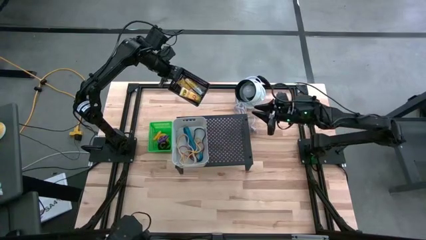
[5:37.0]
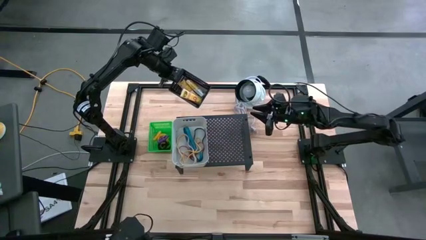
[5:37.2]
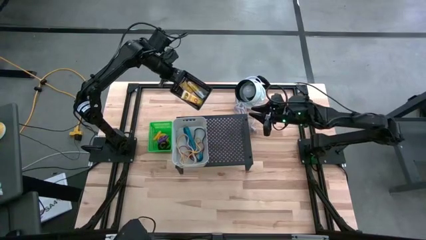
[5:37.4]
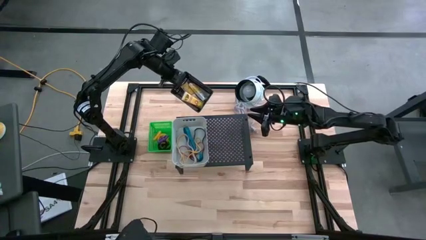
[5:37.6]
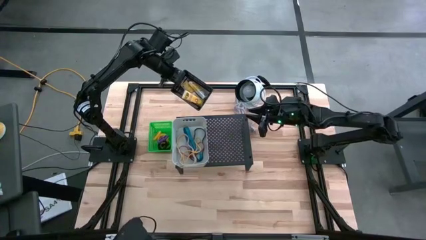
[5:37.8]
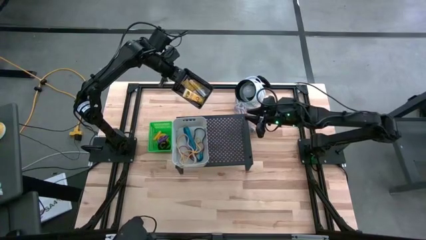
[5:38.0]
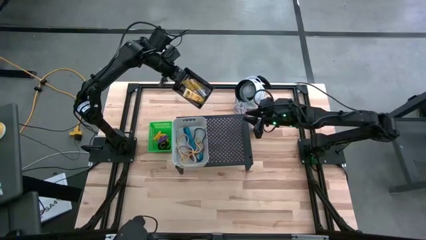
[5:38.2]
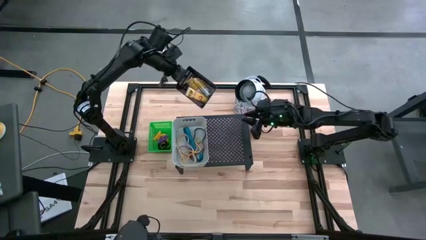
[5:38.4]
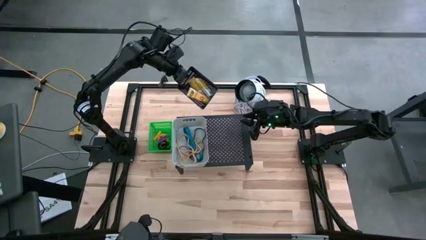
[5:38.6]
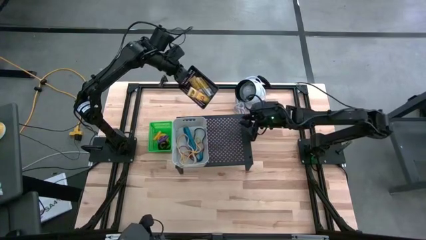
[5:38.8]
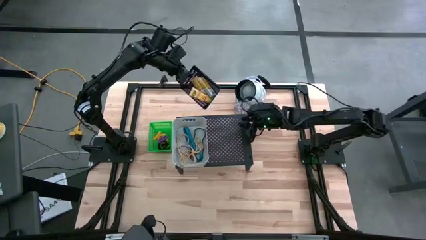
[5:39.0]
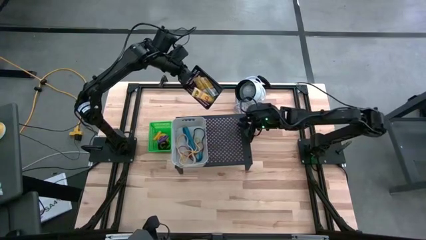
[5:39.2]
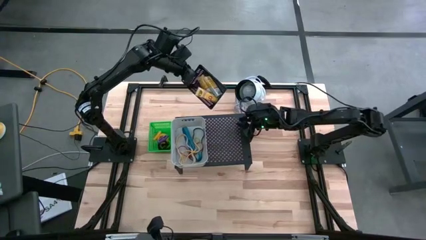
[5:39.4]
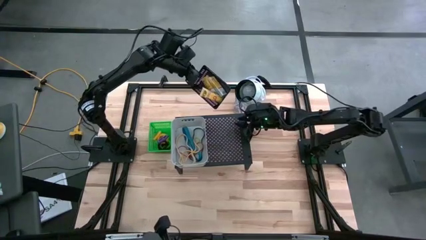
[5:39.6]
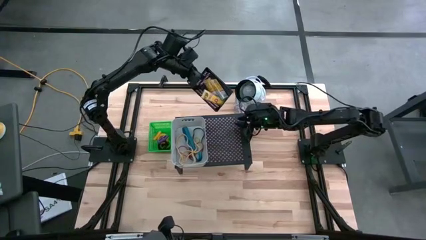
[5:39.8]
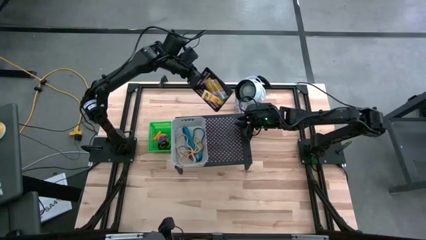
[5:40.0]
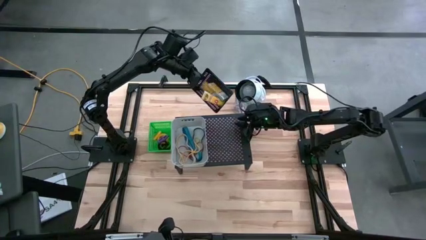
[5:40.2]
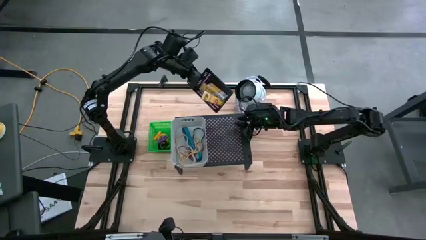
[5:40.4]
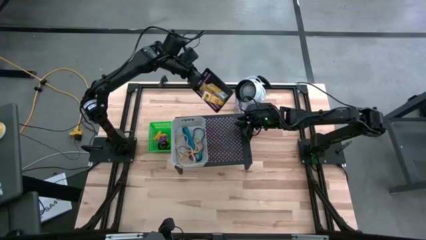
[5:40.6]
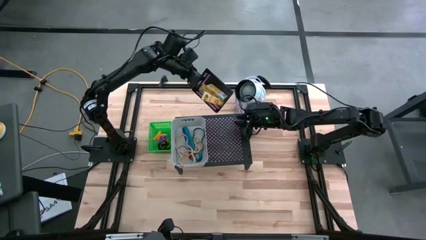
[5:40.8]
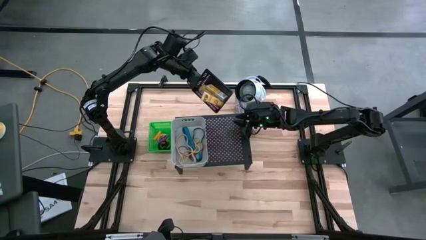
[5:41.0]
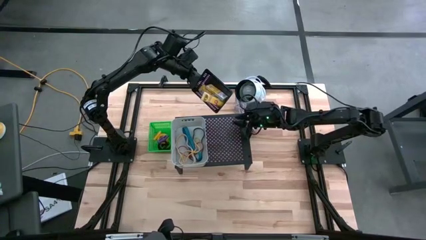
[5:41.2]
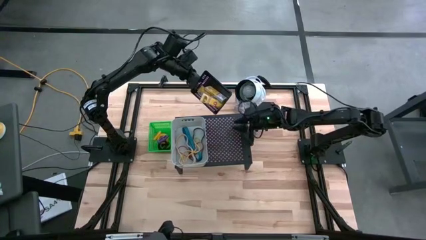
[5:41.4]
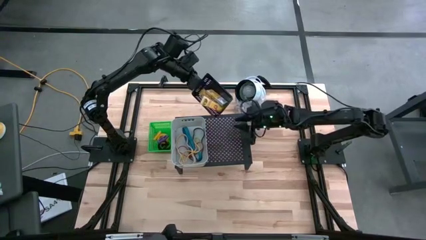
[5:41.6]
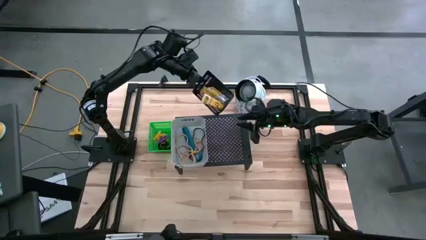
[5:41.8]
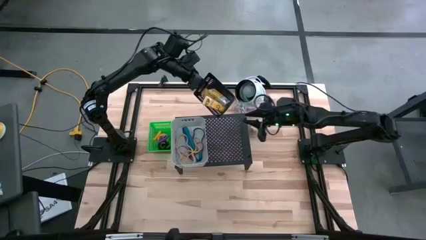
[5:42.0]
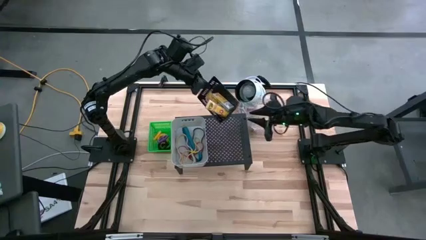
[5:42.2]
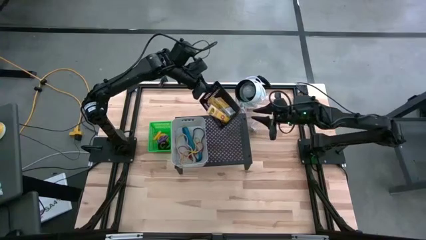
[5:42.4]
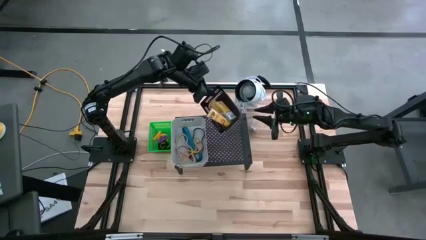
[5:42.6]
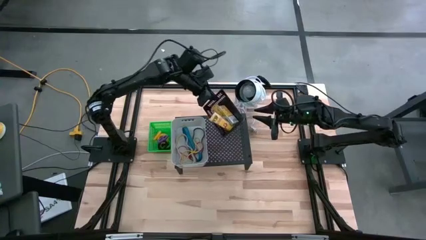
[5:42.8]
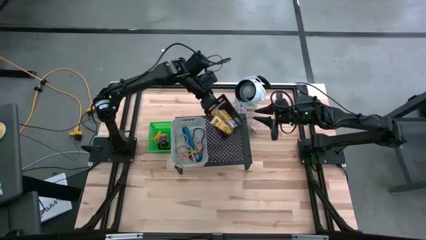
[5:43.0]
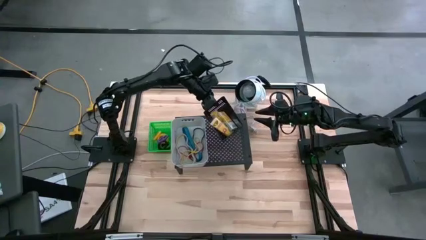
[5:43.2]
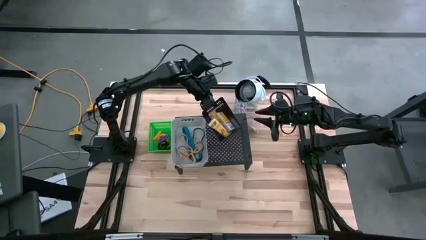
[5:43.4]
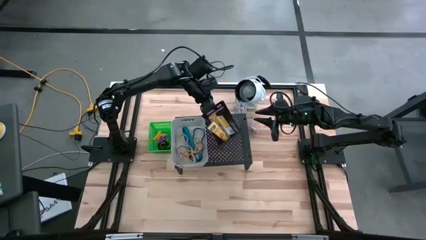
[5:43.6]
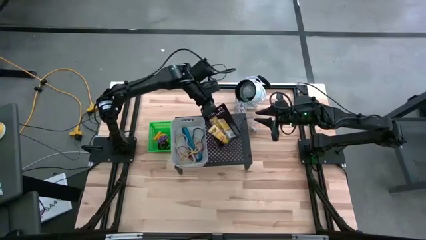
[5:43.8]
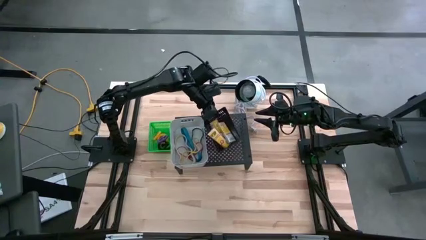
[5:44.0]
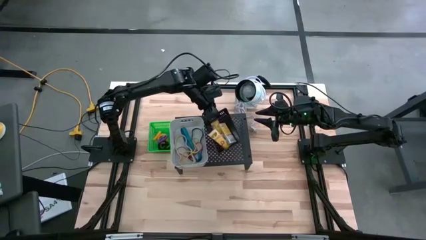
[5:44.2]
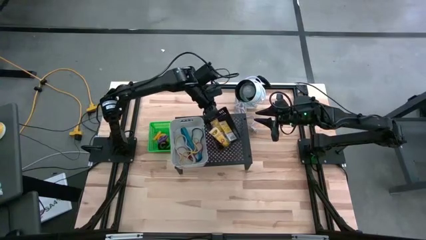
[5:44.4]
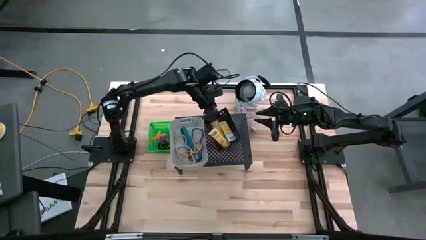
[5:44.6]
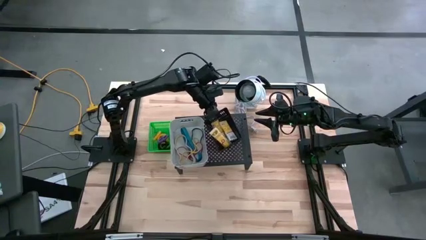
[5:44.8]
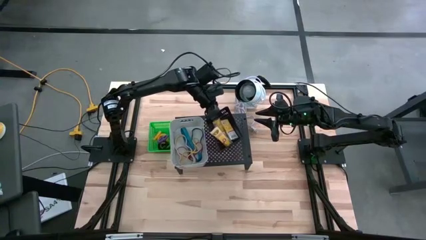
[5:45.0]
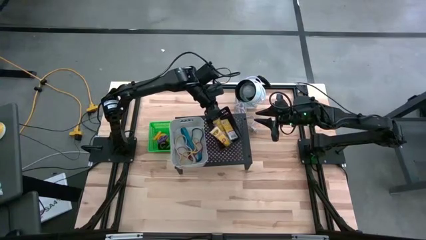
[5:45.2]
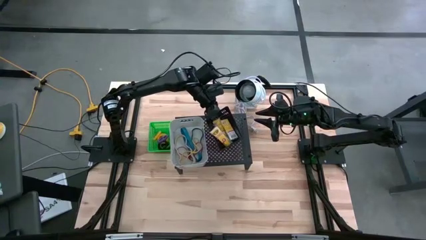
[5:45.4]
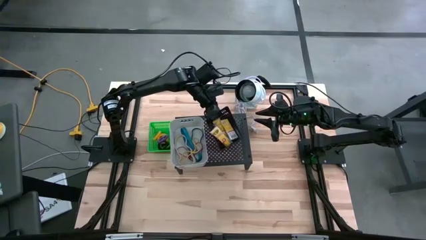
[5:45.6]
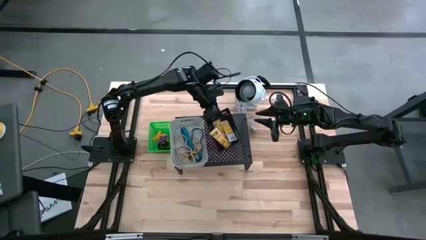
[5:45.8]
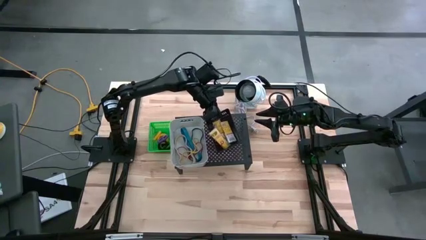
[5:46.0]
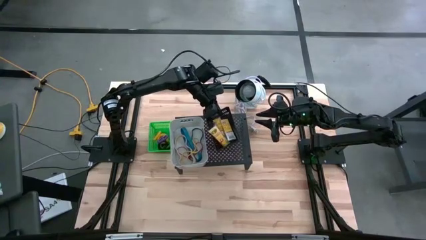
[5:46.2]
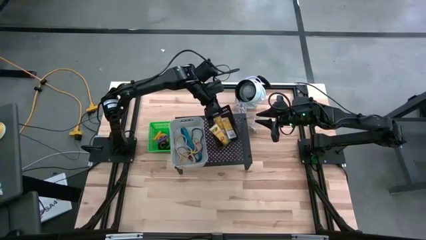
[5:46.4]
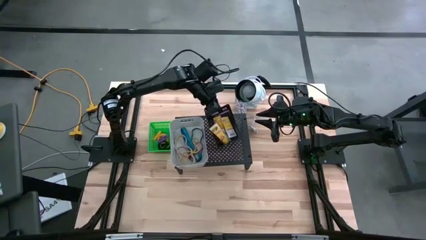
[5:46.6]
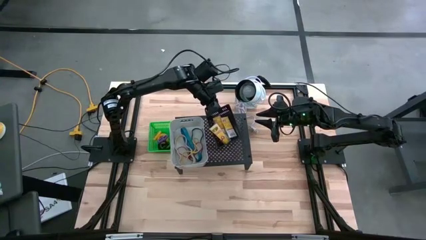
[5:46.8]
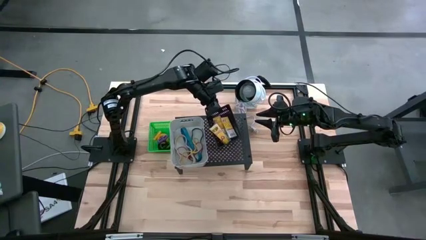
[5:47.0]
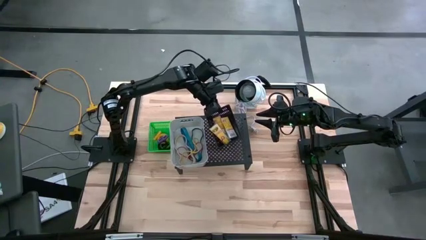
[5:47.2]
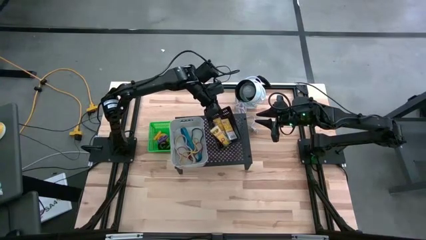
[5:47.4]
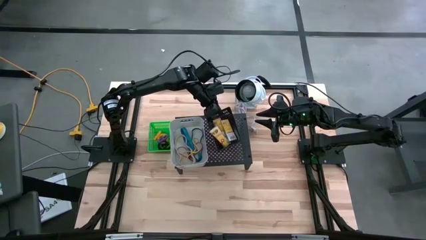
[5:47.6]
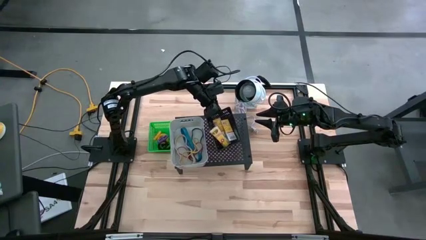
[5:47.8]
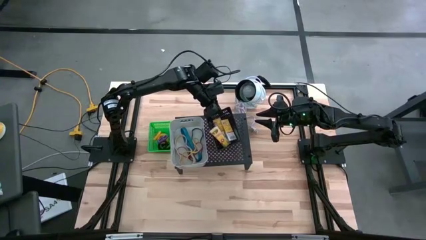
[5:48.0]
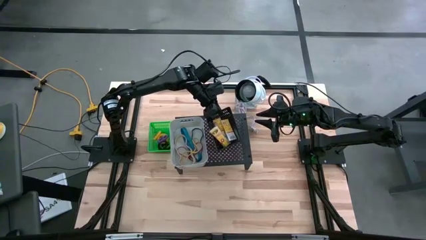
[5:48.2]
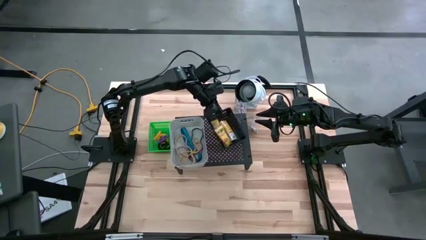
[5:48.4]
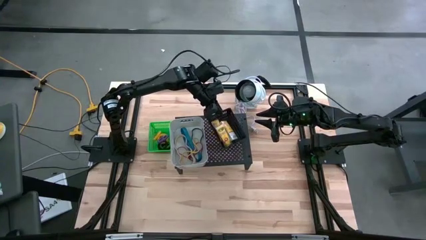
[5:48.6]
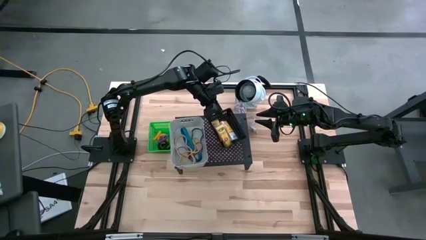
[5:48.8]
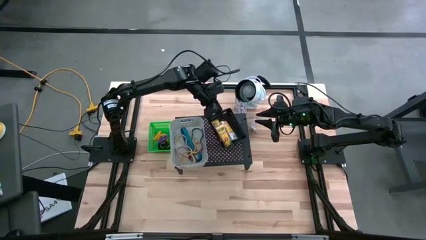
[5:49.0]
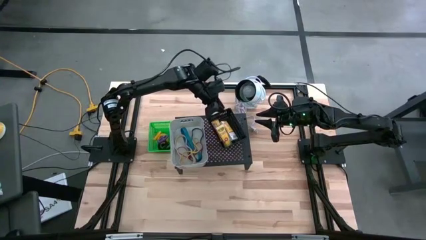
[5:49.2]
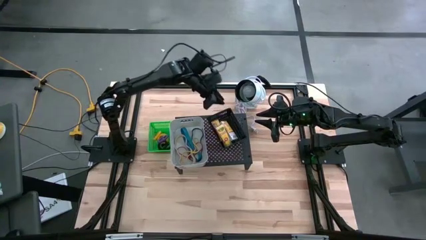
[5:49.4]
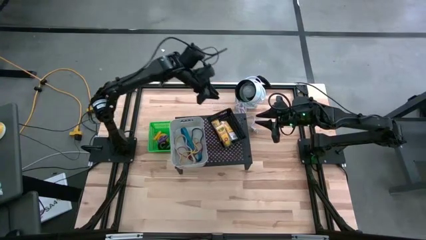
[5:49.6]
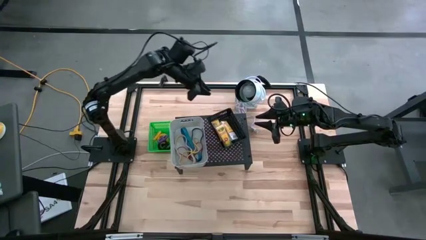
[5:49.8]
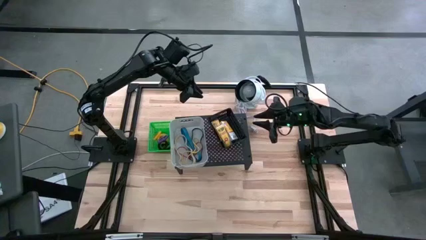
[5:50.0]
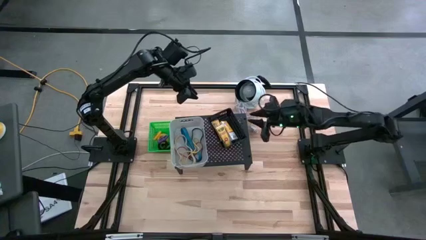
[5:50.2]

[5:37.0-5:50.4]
Task: Pick & Place Office Desk Supplies
Put the black bin with the crayon boxes on the shelf

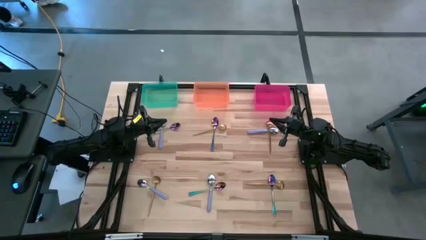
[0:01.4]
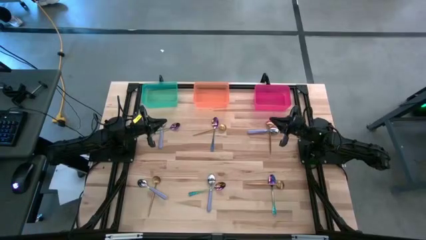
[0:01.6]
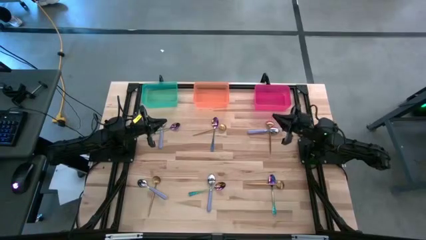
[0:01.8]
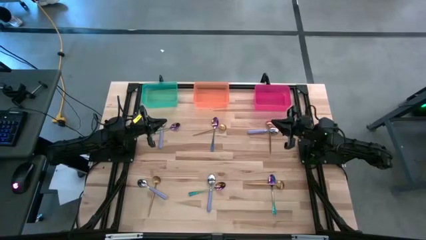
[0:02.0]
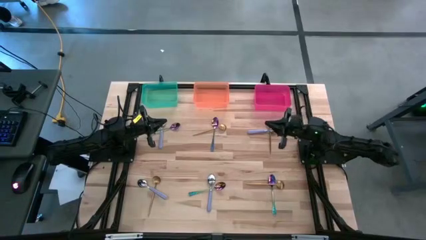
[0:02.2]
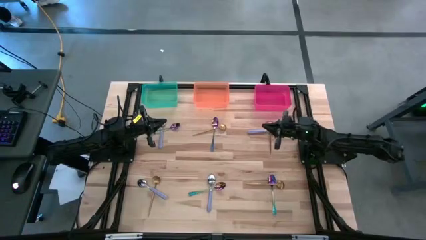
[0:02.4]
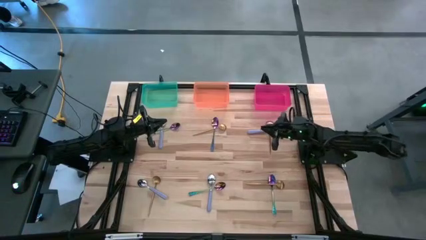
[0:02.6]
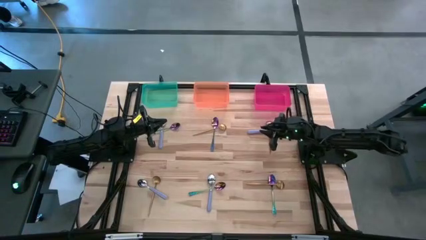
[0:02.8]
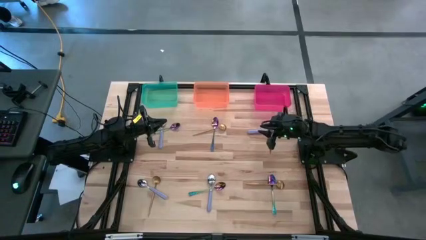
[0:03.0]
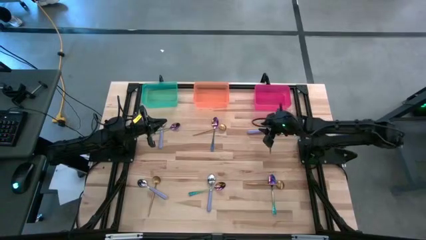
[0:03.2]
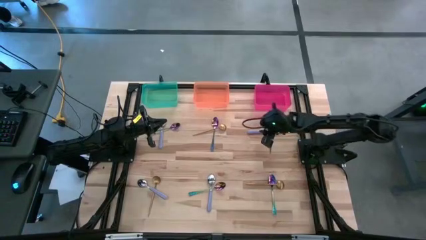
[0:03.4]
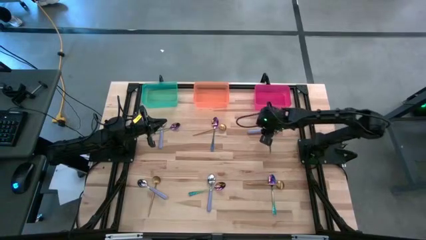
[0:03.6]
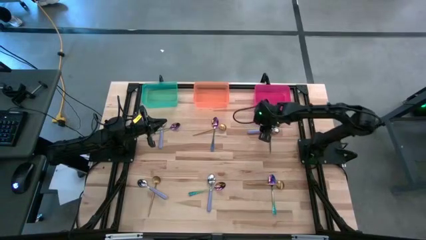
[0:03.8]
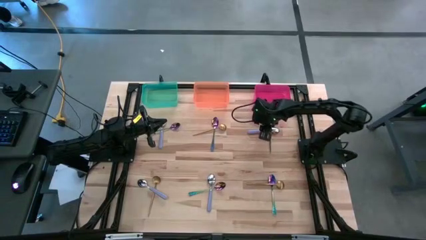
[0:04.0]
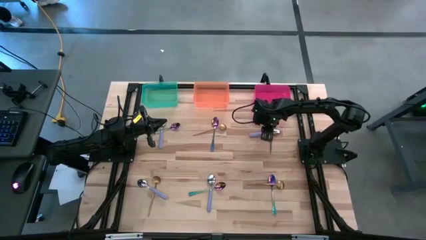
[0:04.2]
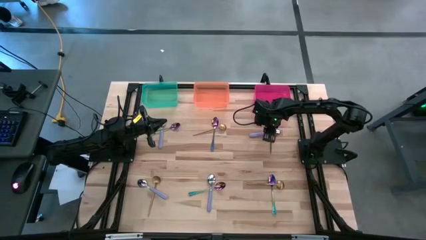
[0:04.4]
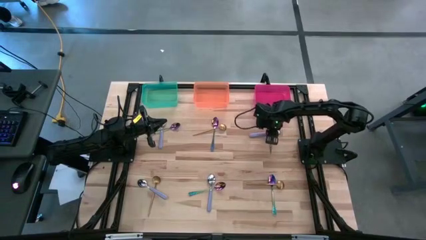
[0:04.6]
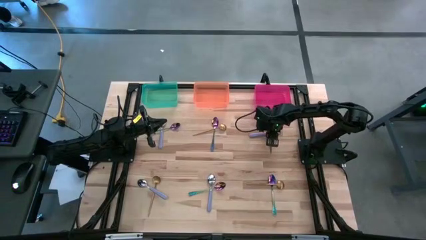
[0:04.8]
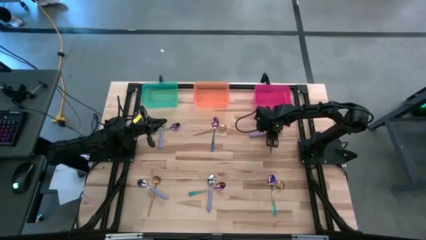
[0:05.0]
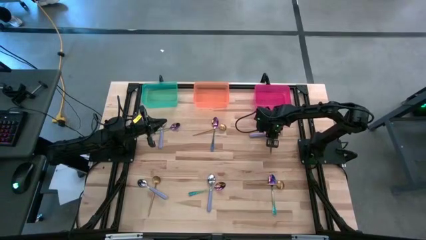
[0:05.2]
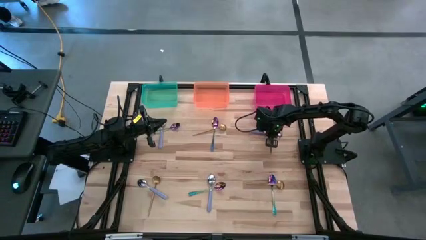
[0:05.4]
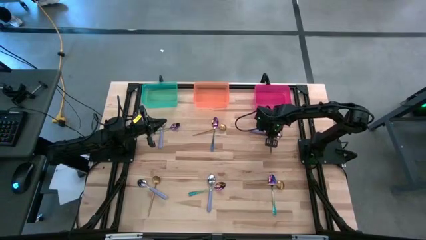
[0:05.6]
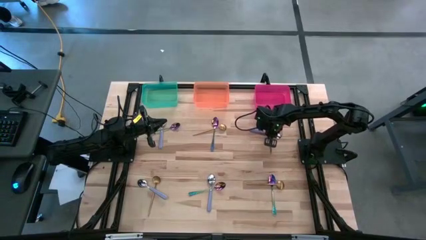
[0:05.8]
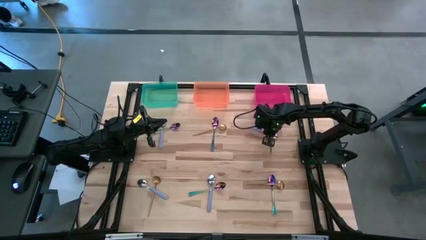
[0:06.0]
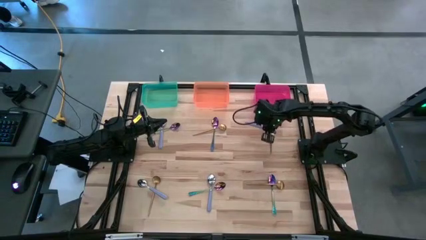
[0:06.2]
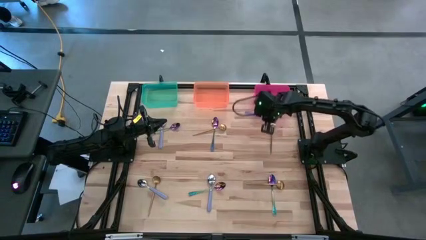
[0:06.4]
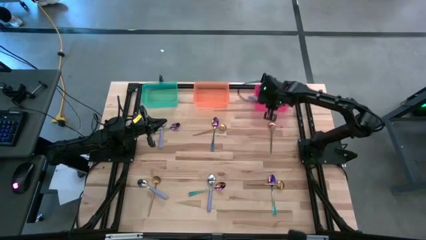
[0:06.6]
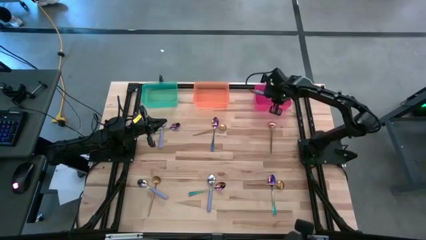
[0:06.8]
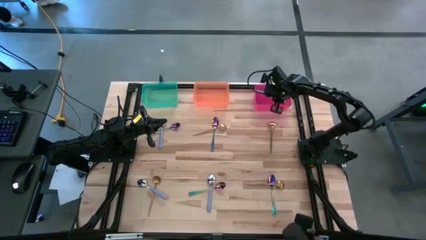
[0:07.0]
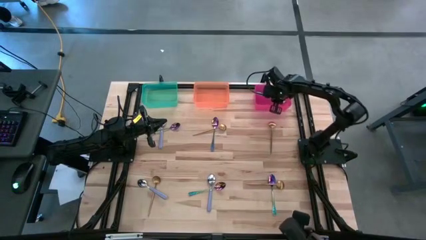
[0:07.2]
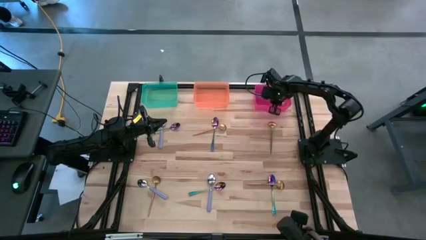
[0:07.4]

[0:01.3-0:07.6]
Task: Sort silverware by color (type)
Put the purple spoon into the red bin
